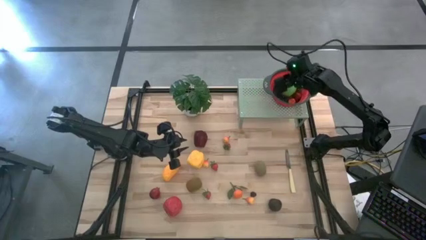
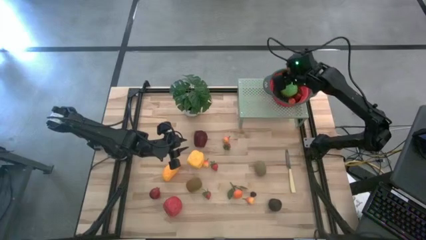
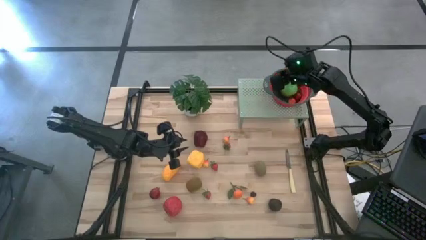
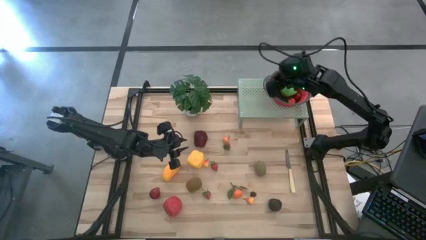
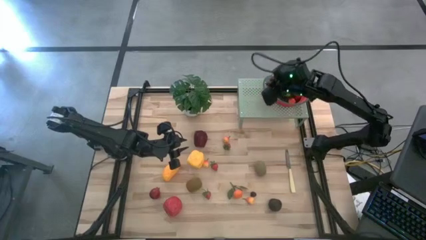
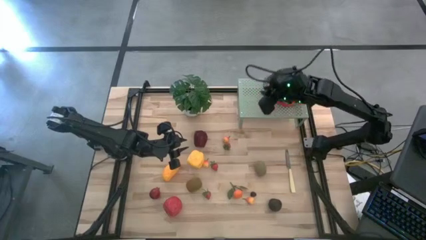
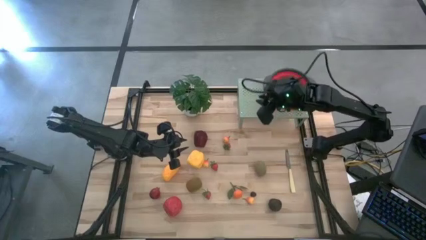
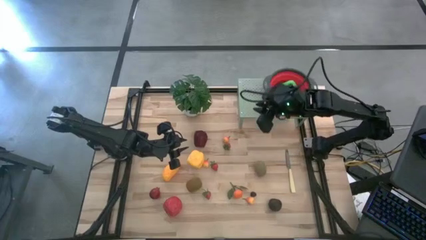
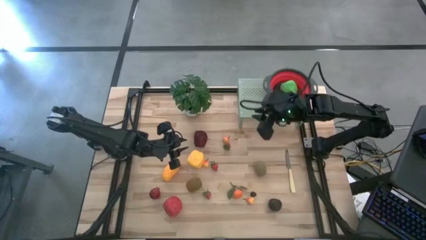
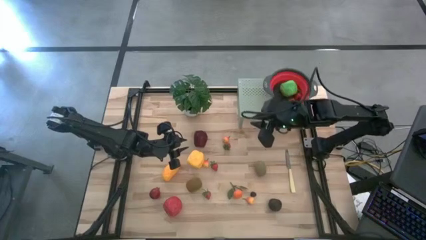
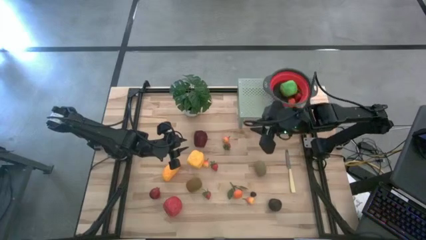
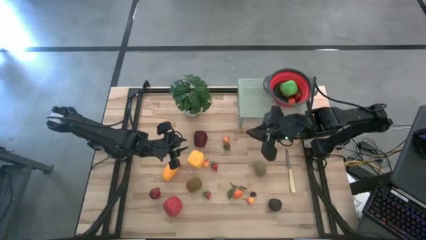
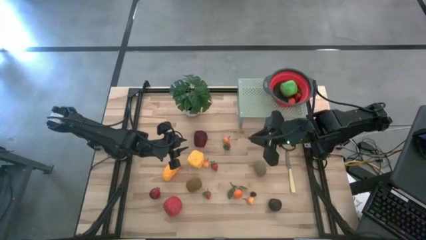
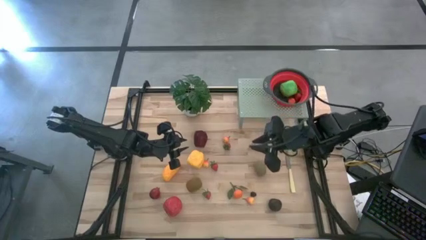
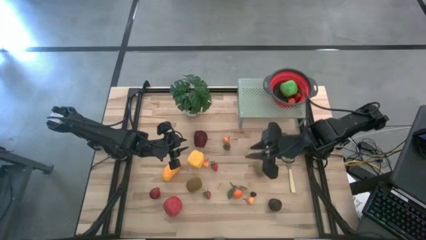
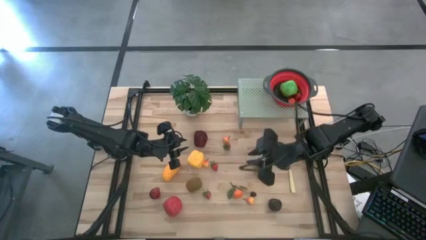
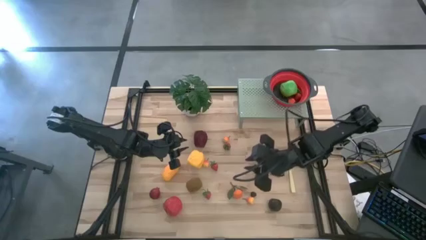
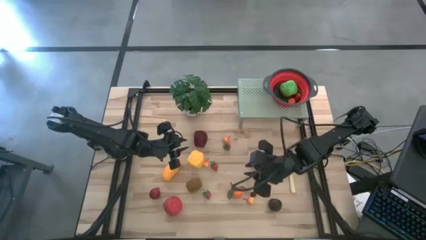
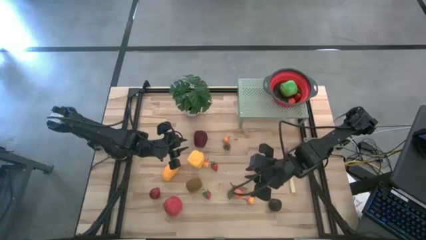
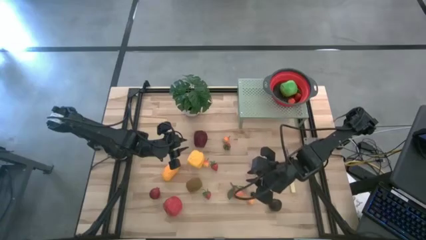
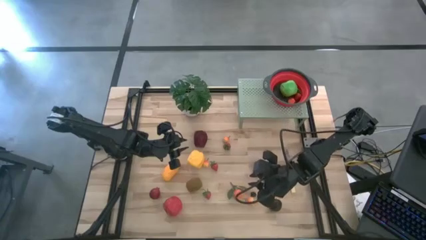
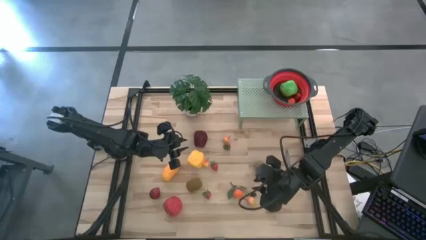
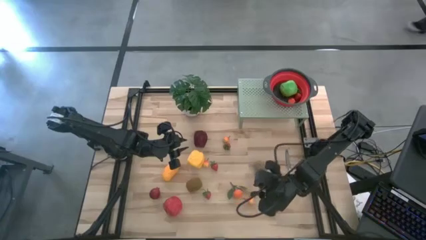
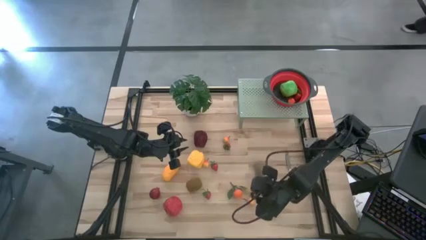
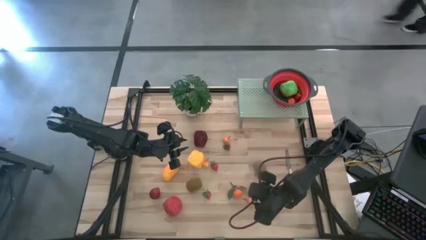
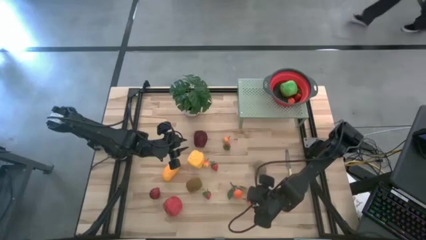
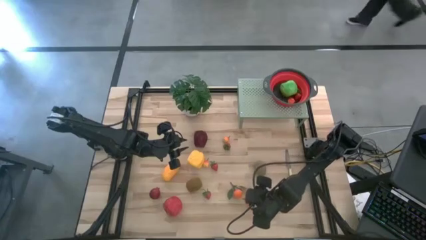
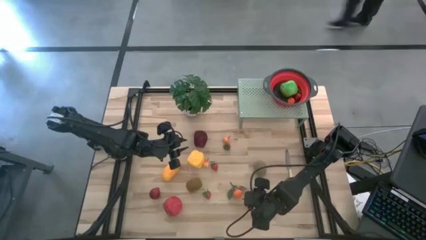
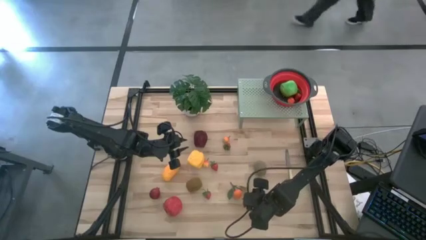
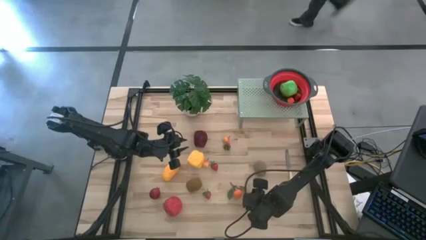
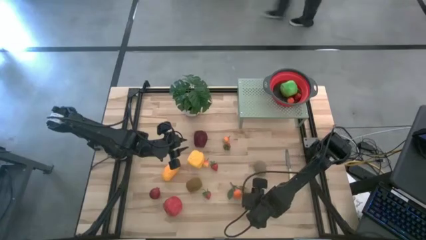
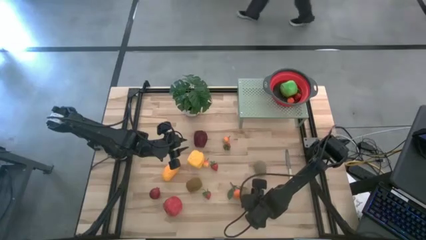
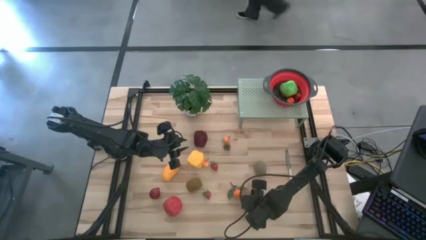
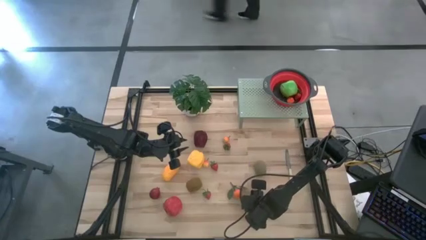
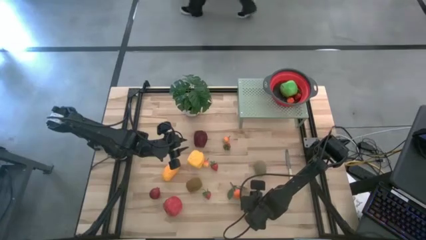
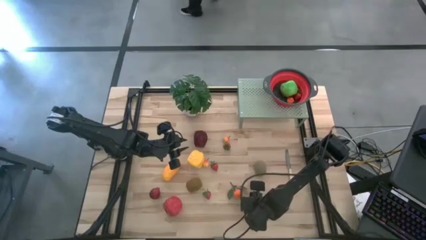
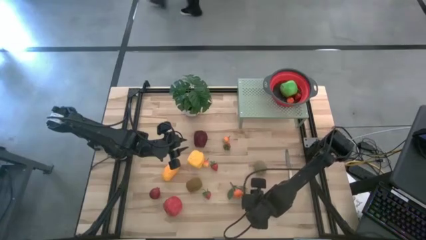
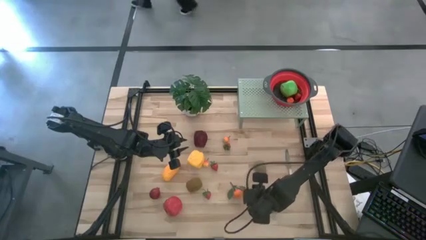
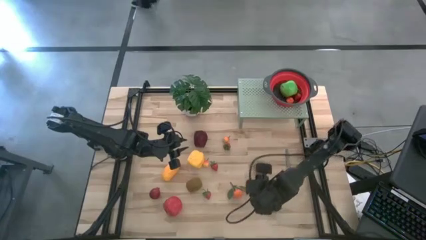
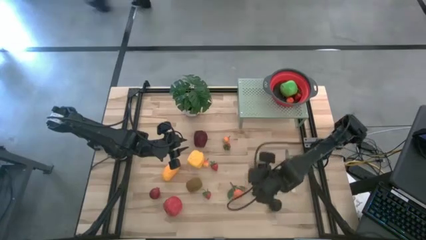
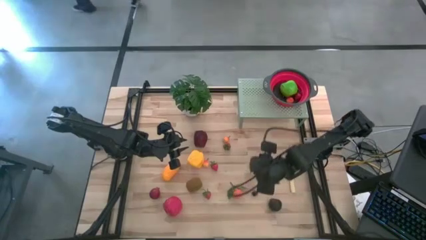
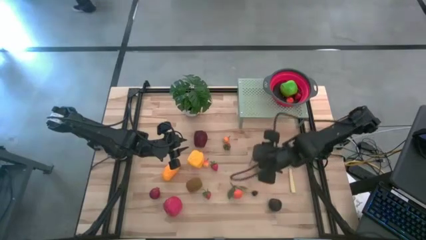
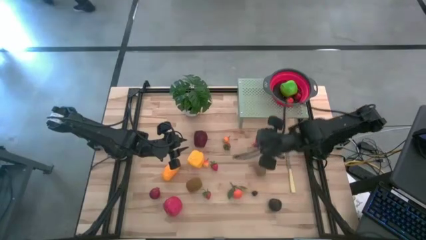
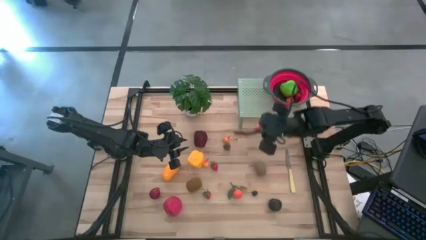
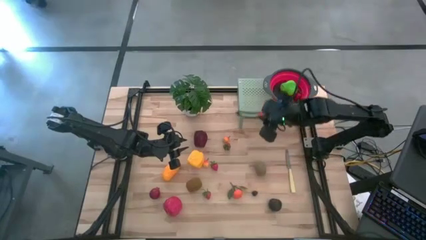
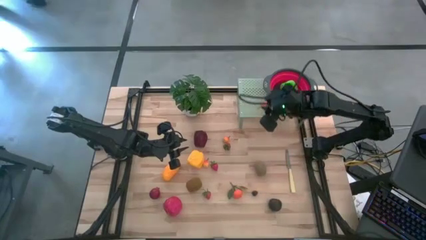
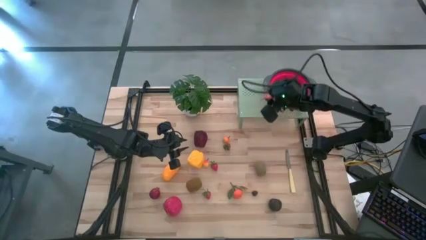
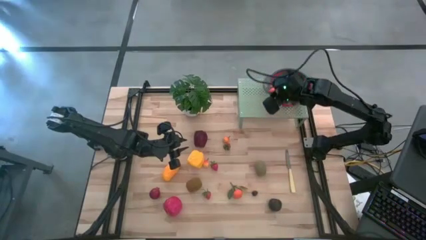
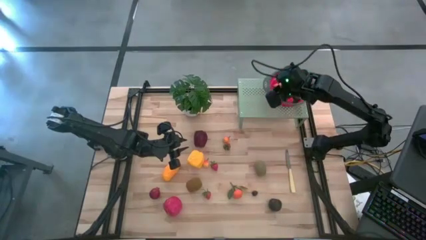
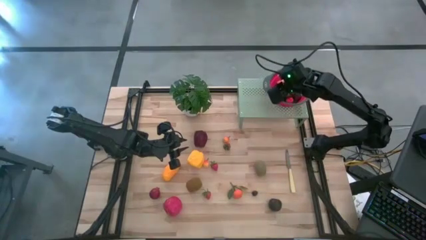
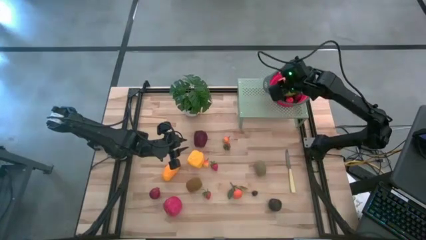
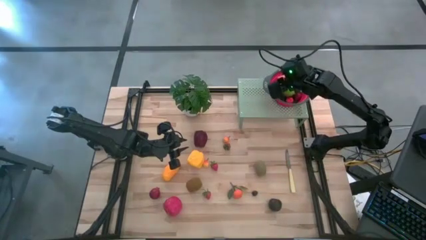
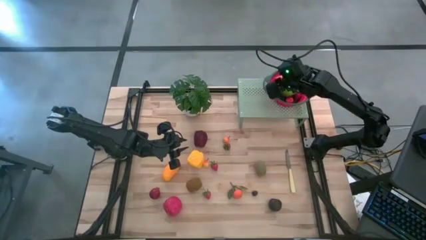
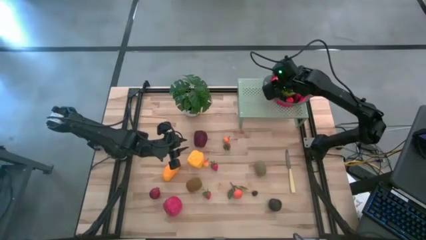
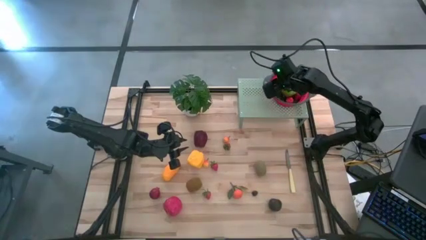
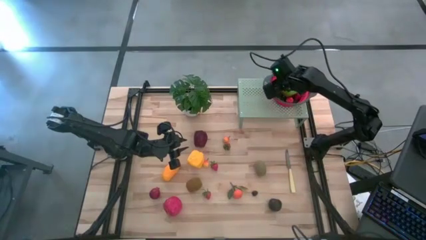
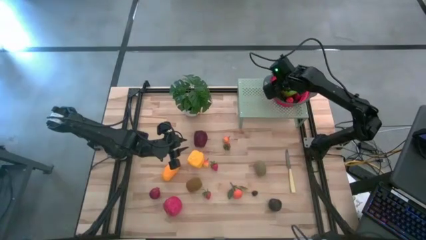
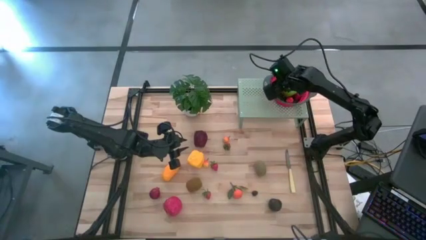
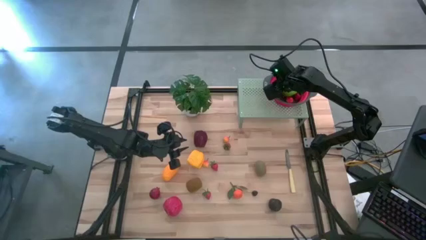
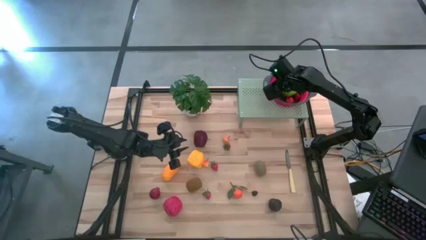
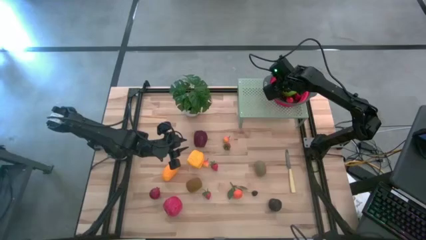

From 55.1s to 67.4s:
Task: Pick & Place Fruit
Put the orange pear into the red strainer bowl on the shelf

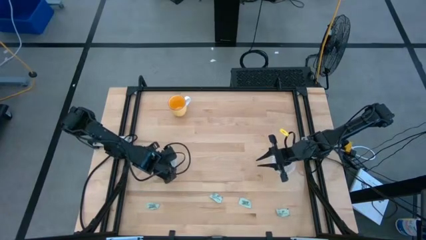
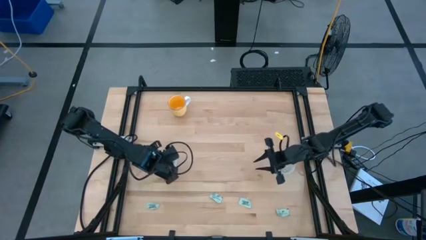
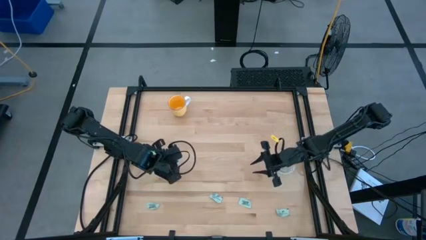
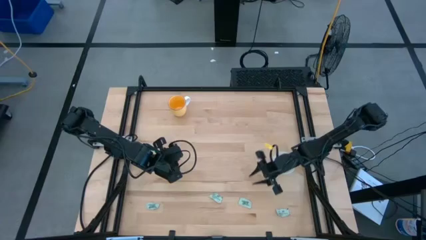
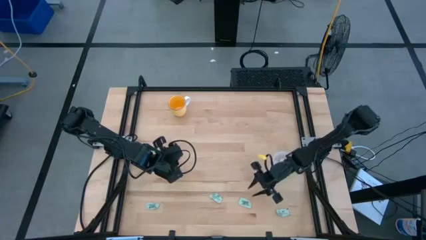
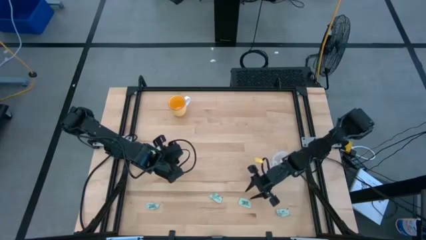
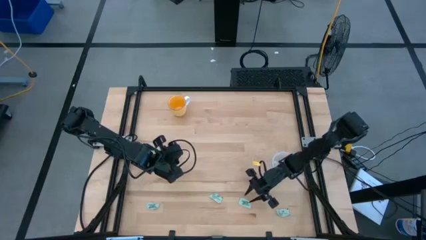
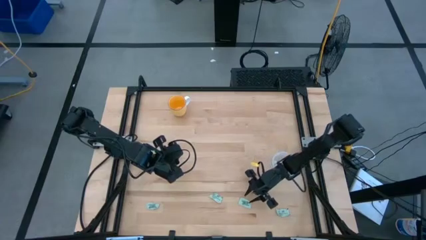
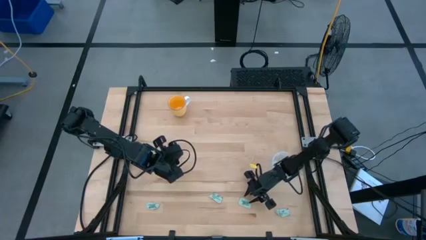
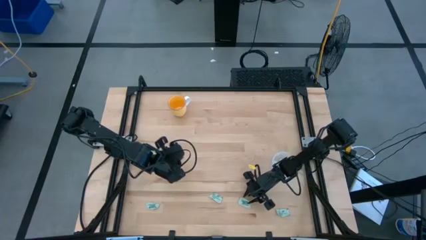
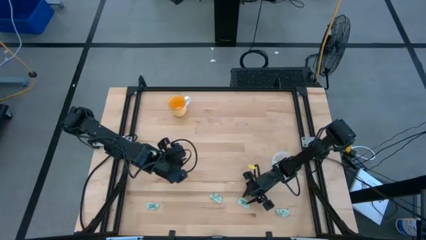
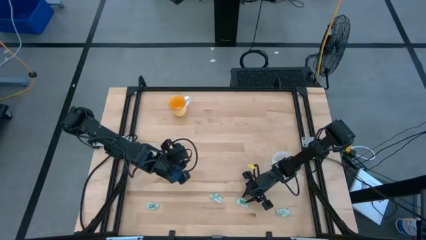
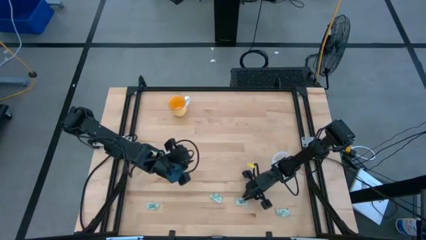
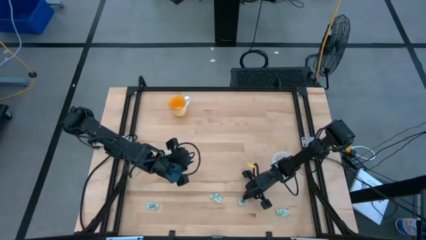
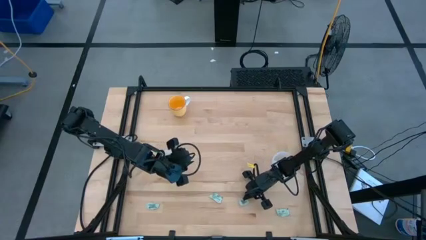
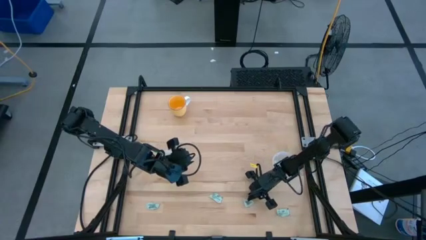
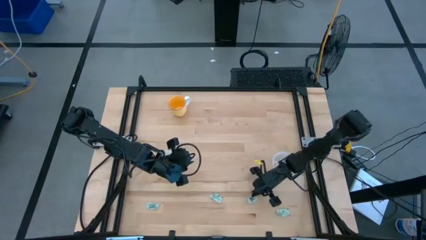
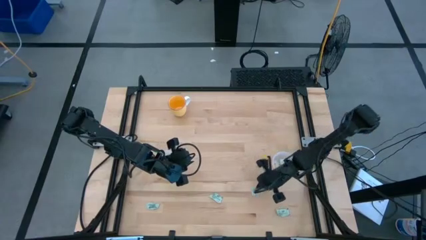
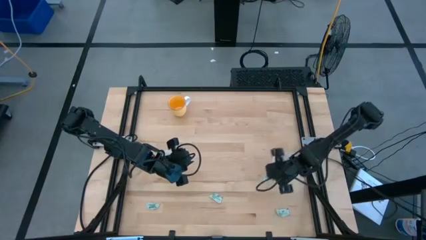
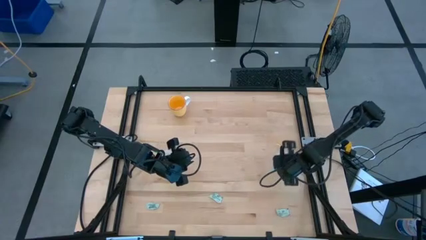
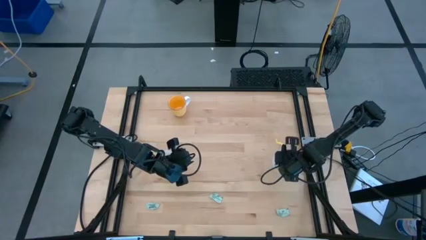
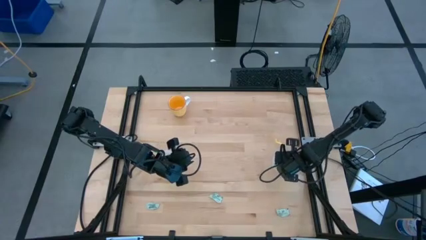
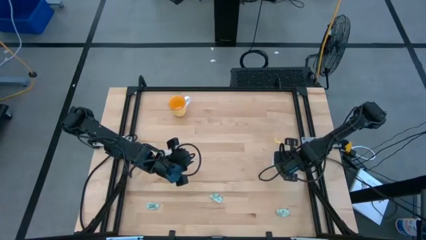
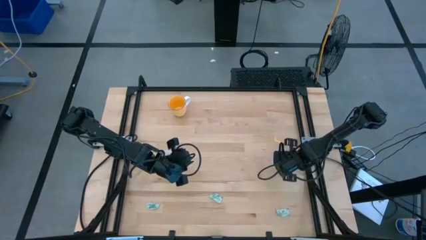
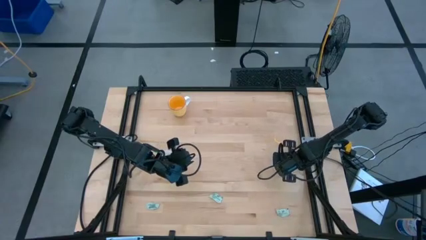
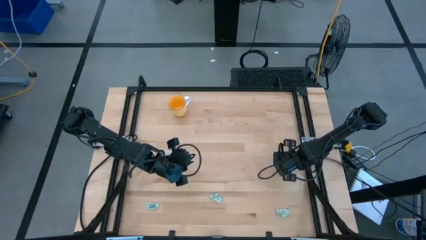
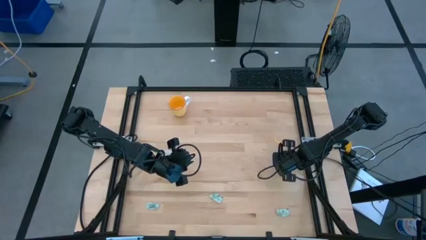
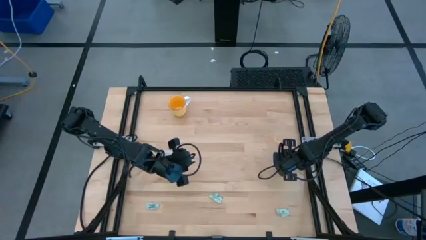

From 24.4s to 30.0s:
Task: Pick and place items into bin
Put the stevia packet into the right transparent bin
